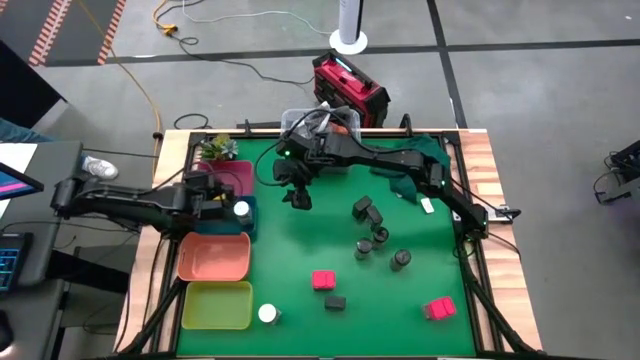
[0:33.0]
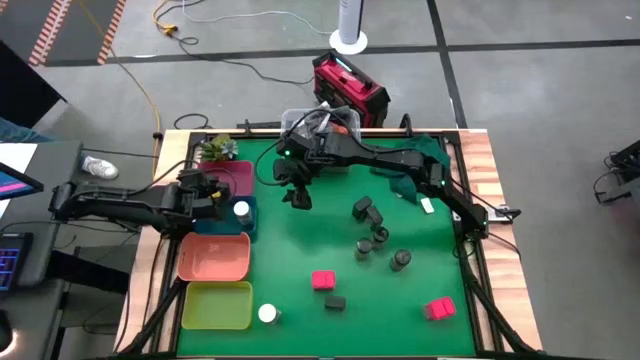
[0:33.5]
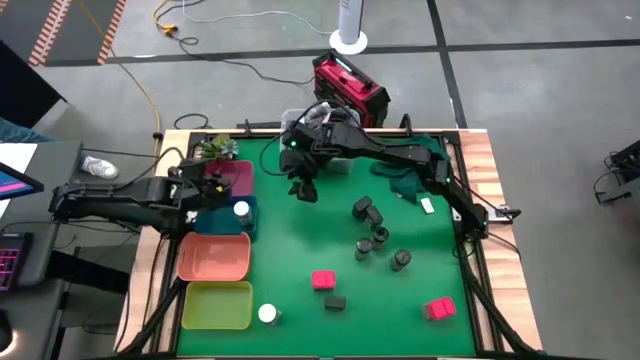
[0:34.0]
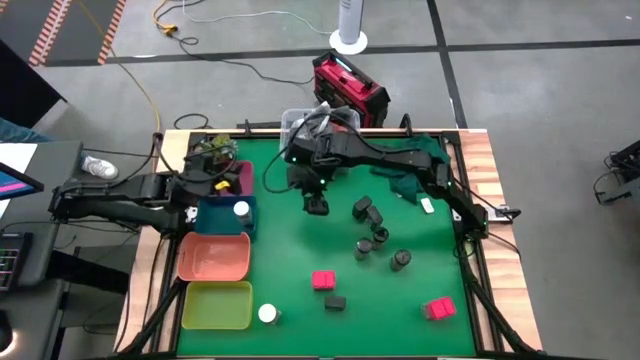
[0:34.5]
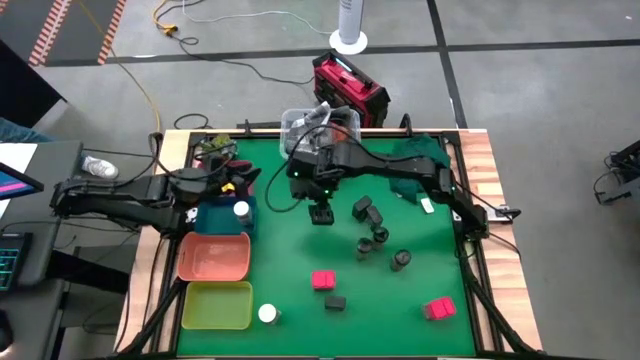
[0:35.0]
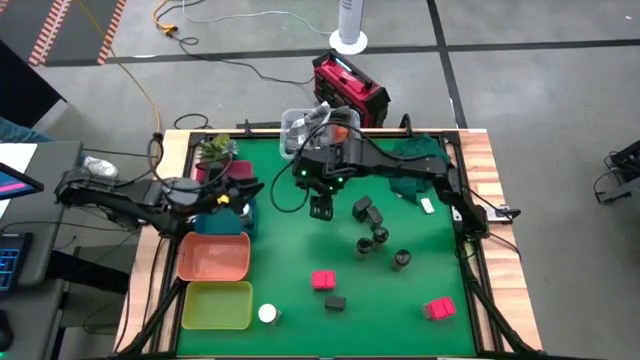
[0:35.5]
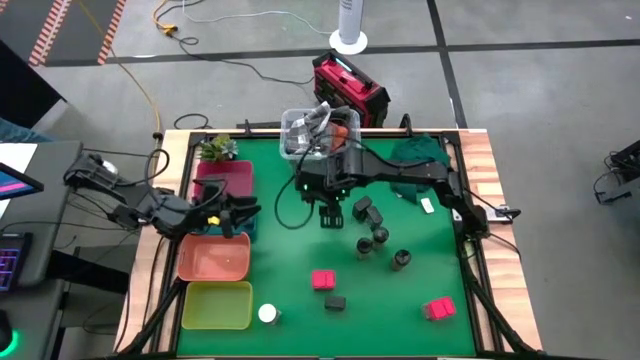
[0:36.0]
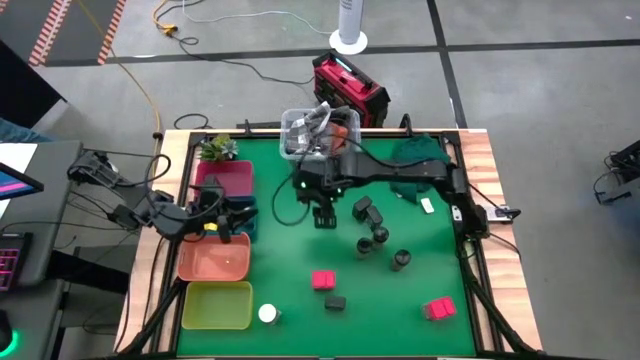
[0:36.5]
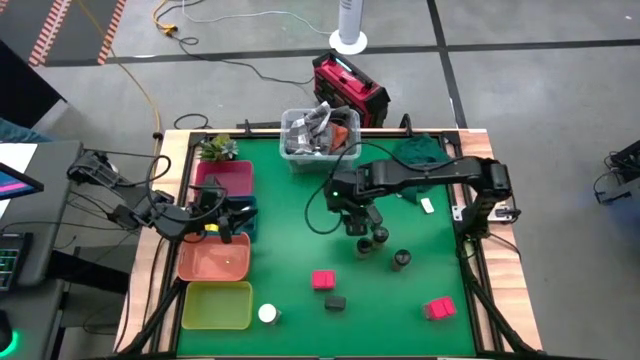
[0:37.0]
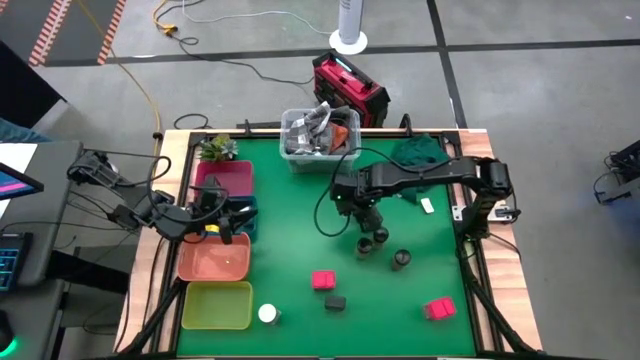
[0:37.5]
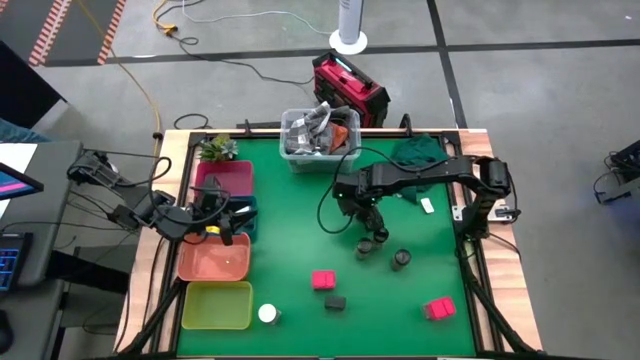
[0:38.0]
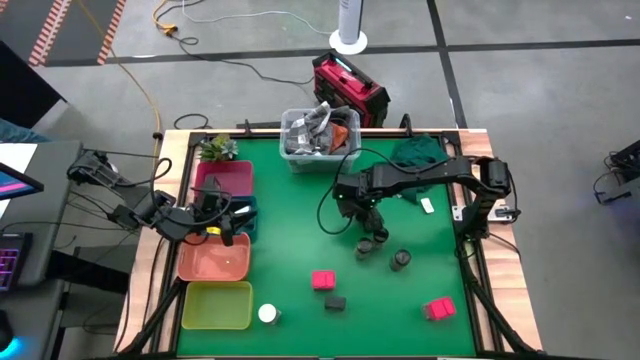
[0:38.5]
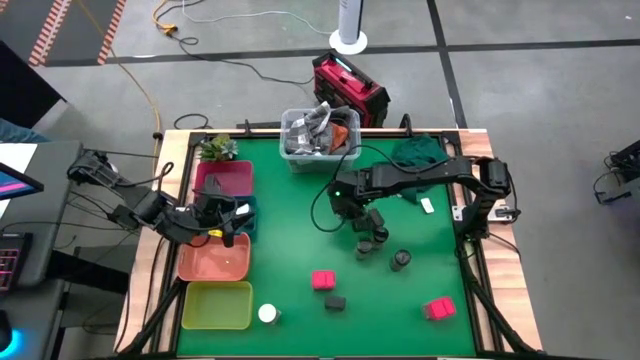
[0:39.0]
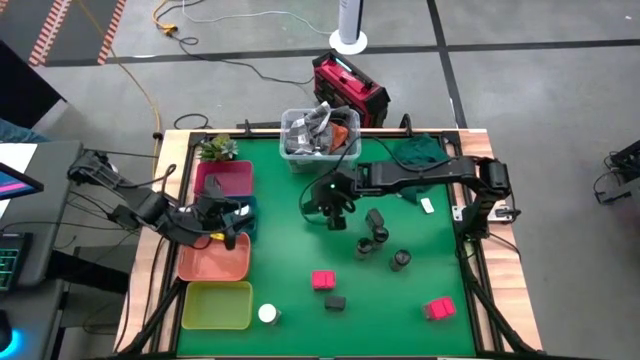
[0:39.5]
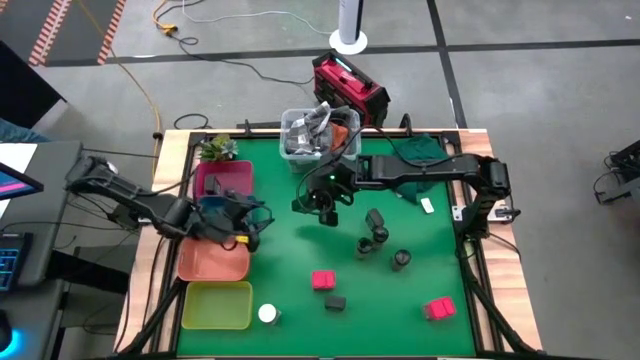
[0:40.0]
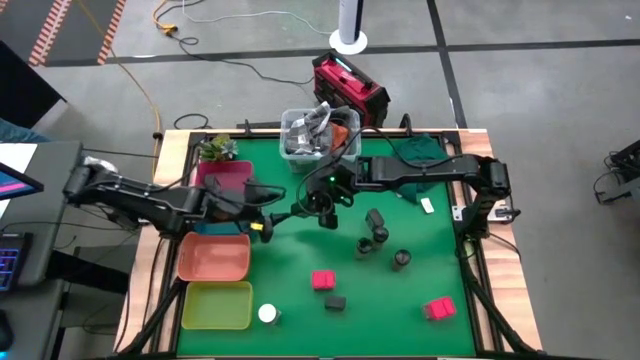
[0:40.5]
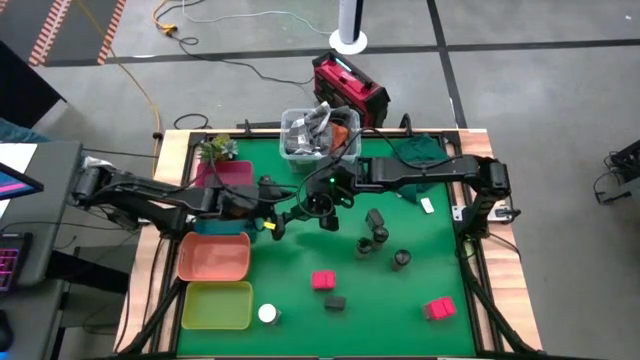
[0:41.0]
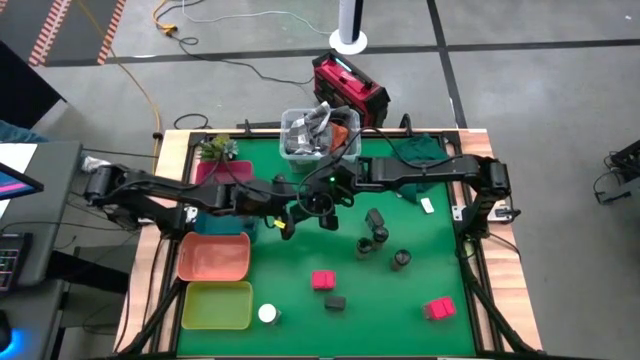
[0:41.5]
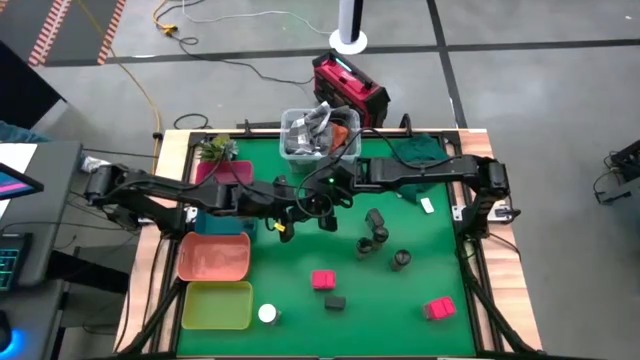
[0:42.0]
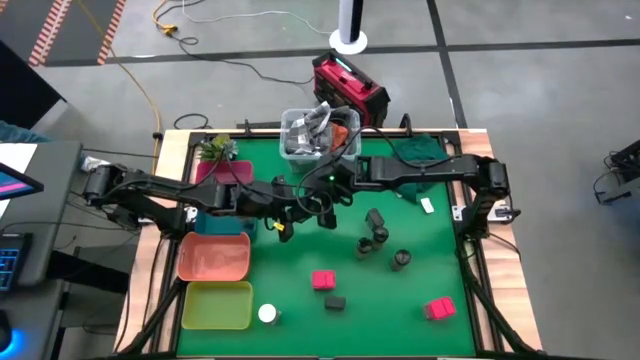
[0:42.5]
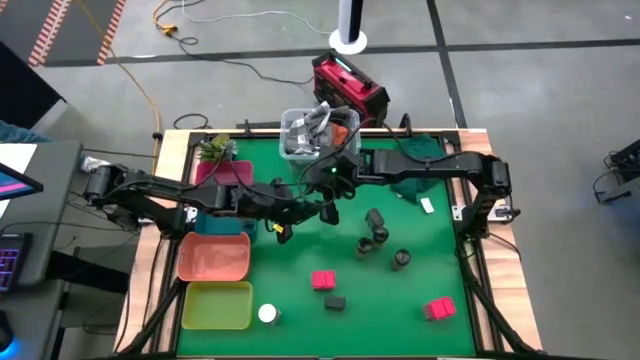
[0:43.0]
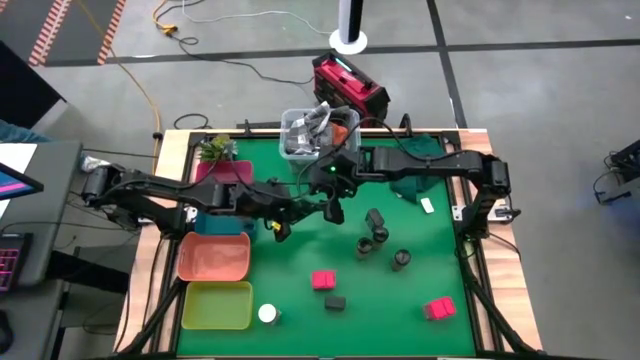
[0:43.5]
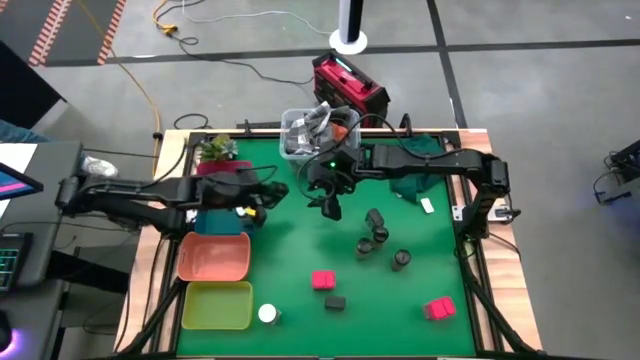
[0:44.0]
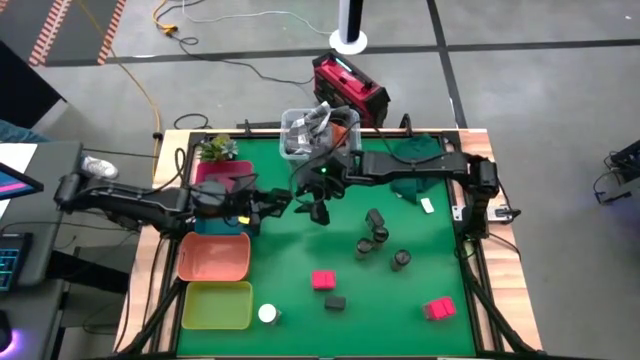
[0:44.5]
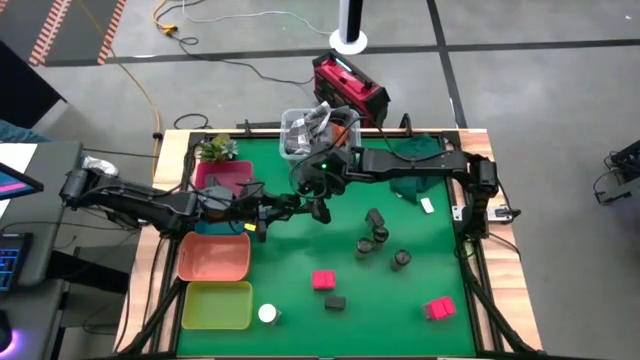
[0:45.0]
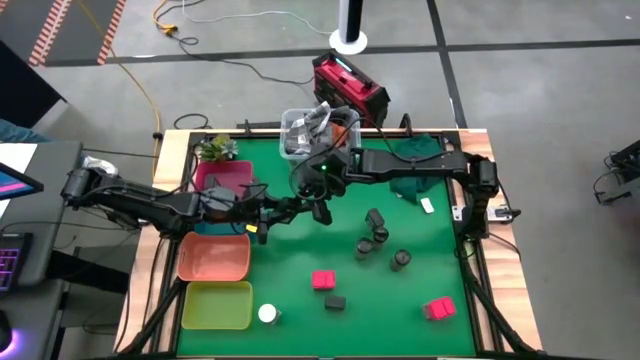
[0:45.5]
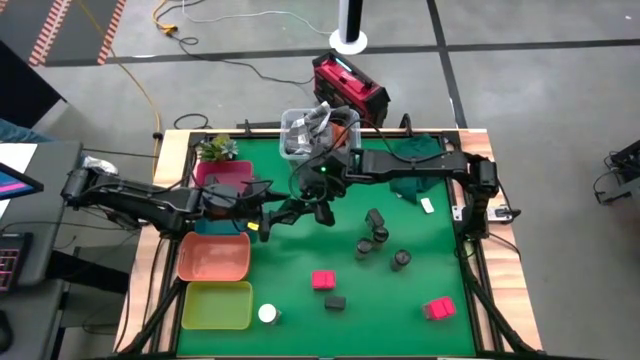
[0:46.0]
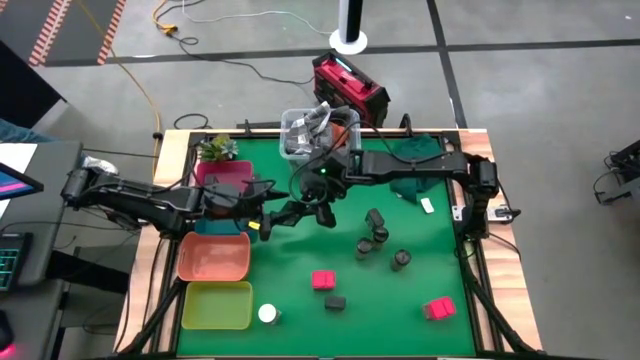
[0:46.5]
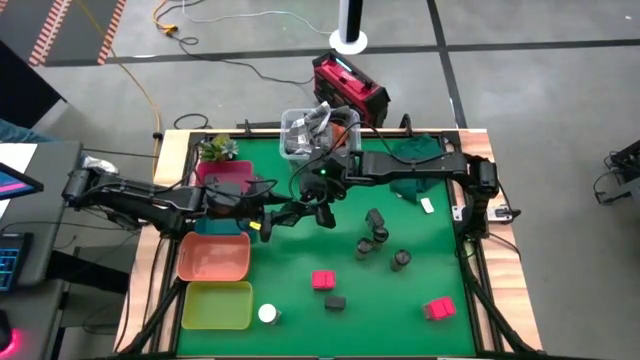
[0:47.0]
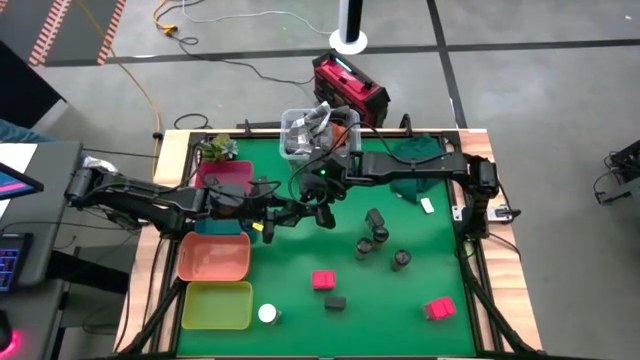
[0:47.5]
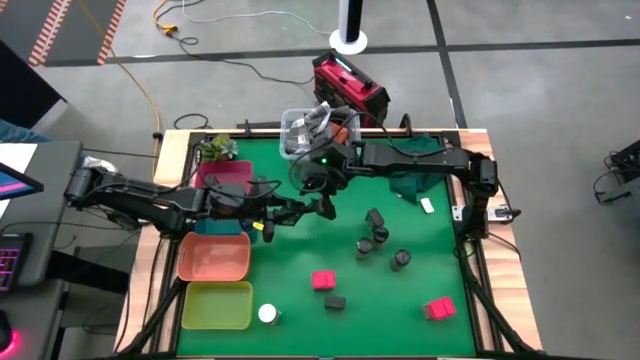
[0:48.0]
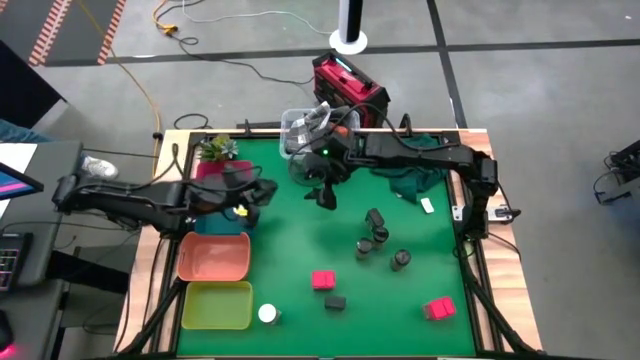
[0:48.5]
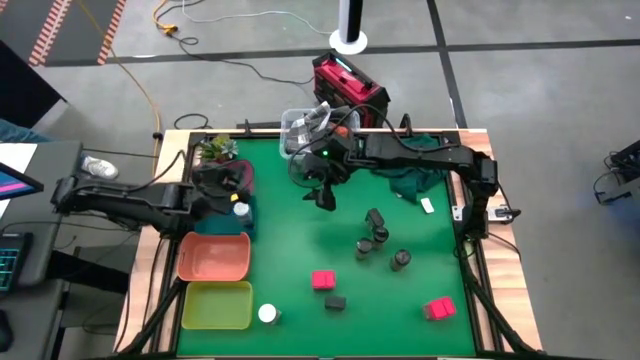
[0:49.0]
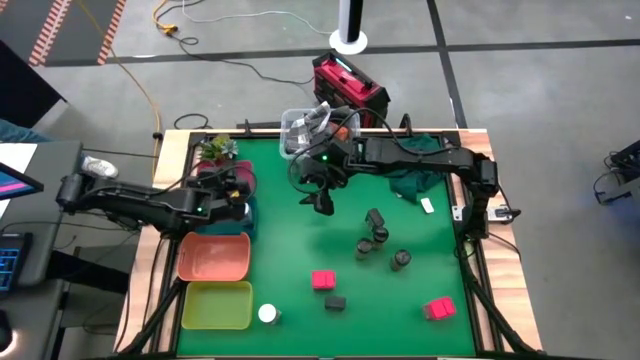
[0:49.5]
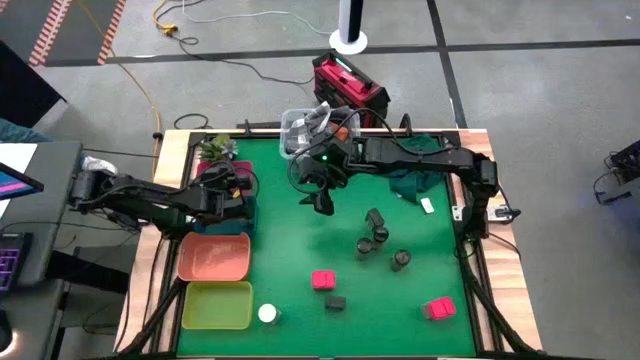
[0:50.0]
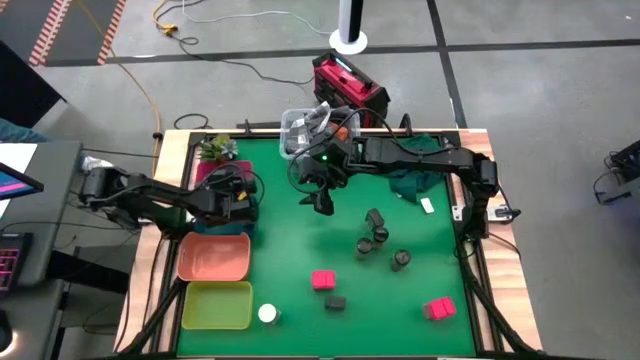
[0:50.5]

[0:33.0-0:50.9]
Task: Sort spices by type
Put the top left green seasoning can into the red bin

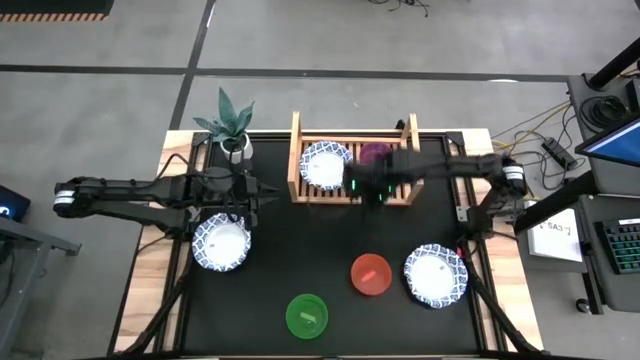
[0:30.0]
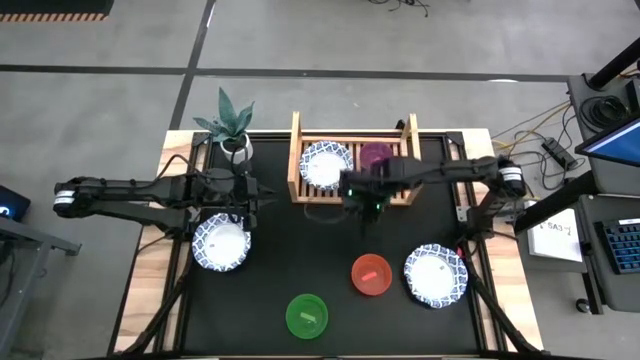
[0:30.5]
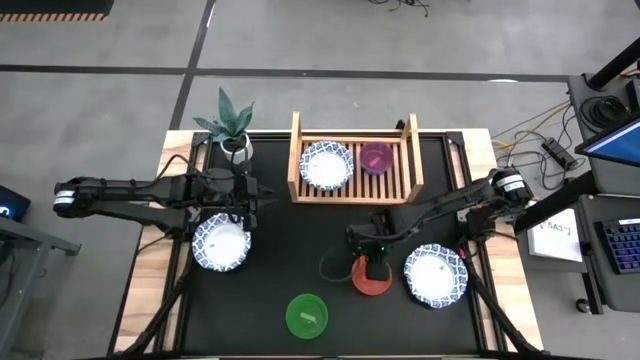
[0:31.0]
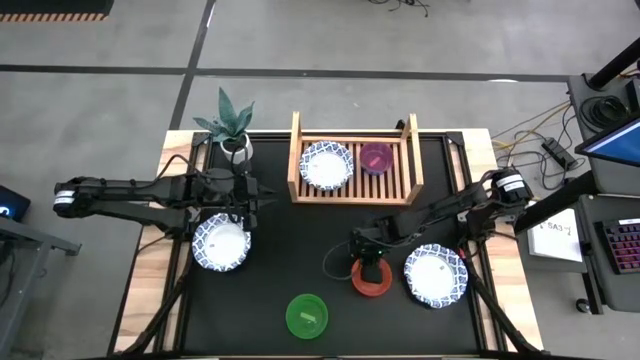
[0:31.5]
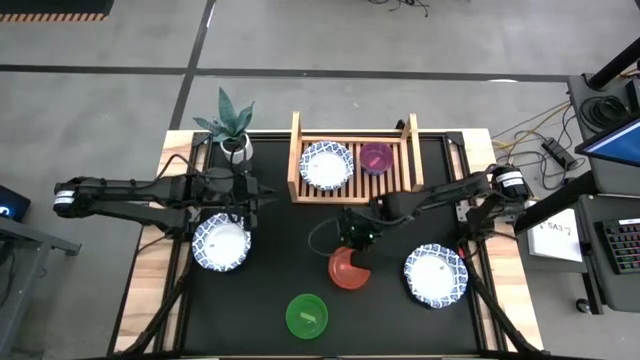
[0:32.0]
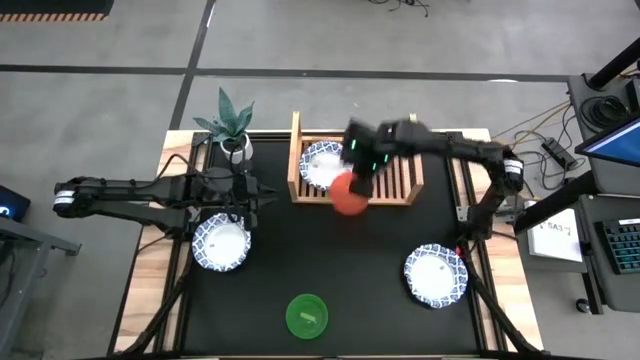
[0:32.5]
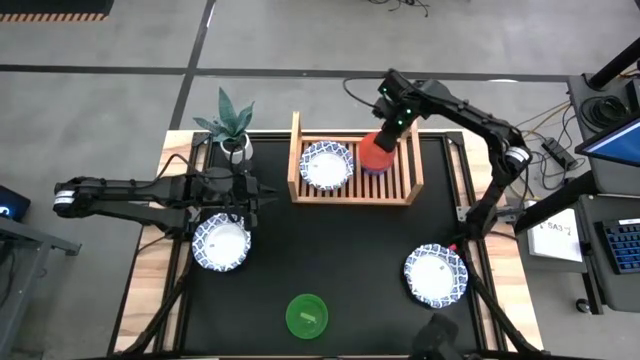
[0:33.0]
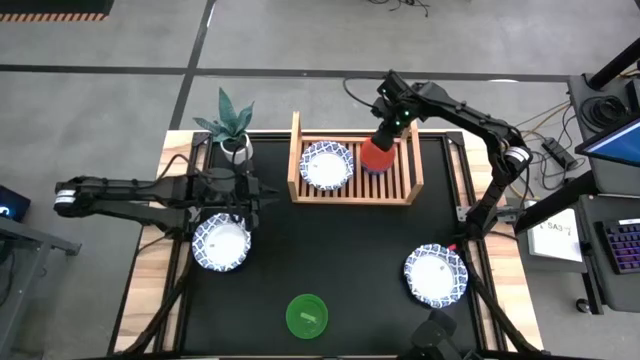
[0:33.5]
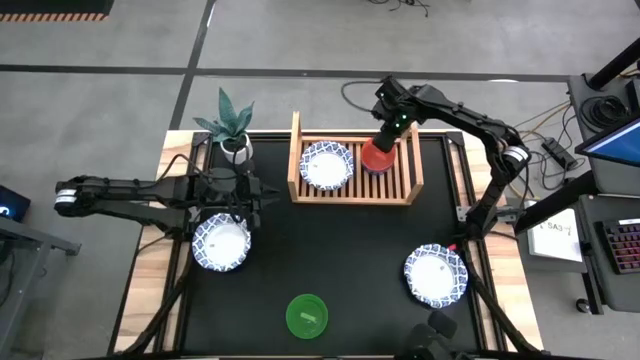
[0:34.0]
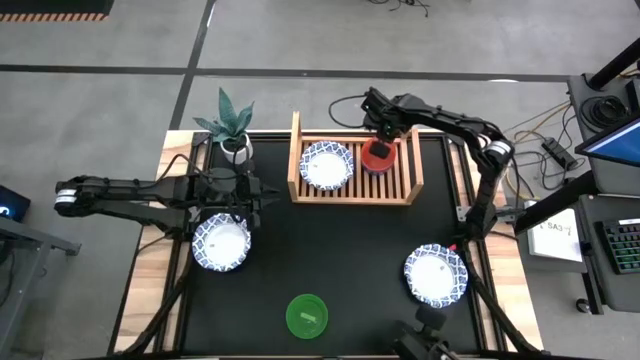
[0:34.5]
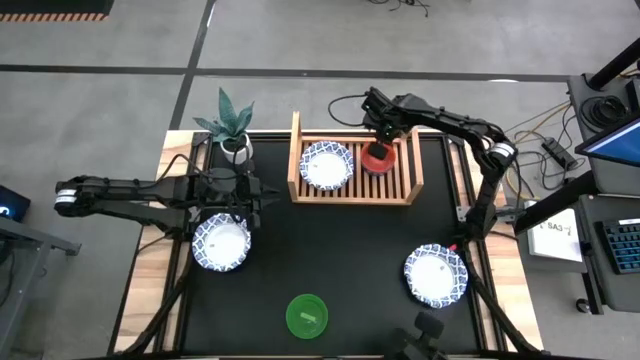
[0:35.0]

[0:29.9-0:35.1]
Task: Place and stack bowls onto a shelf
Stack the orange bowl on top of the pink bowl on the shelf
